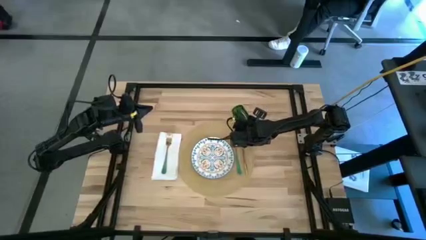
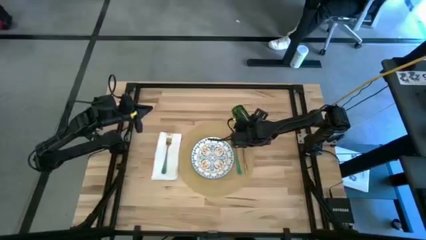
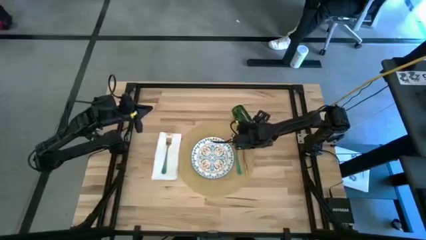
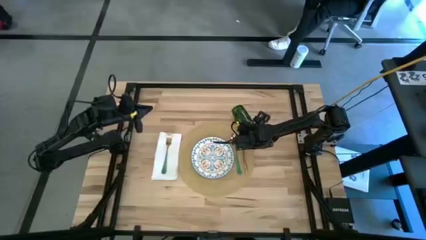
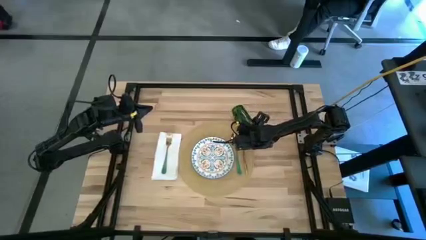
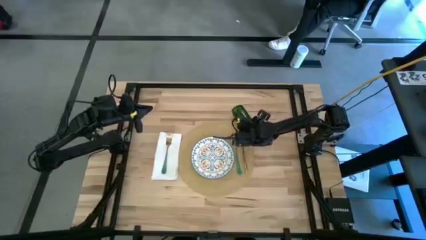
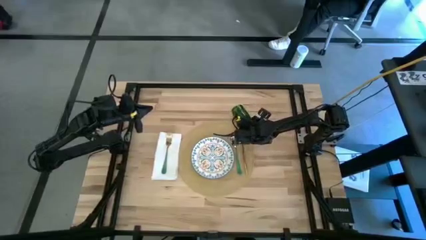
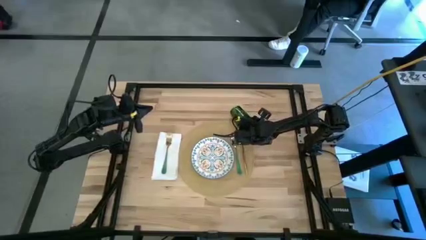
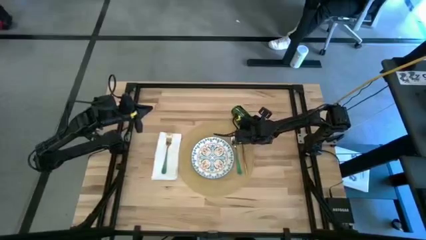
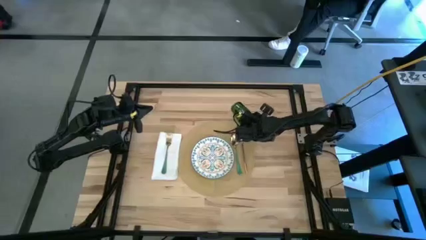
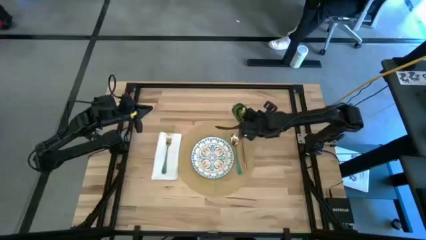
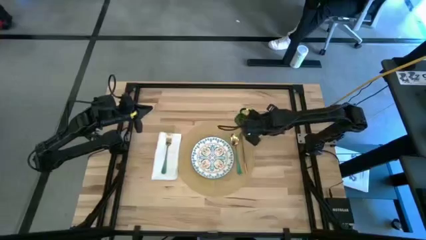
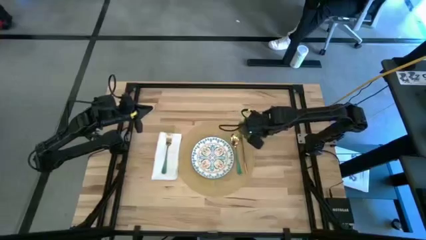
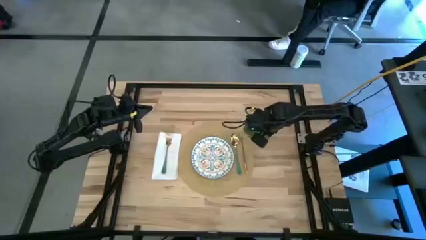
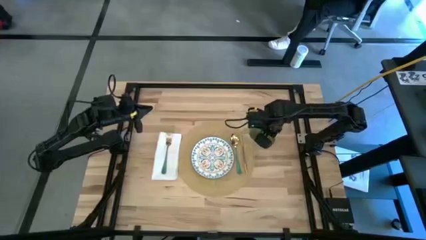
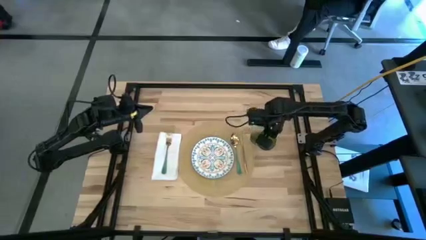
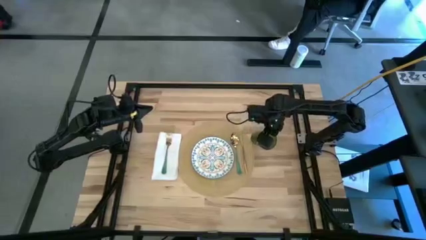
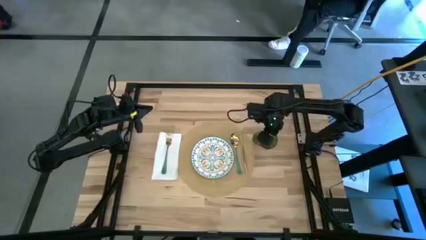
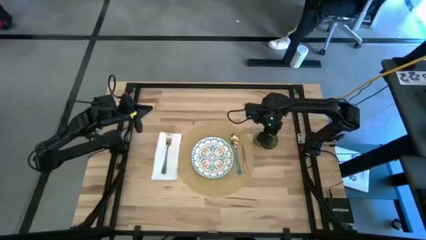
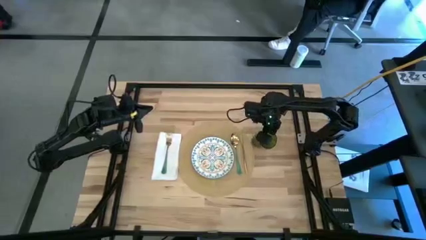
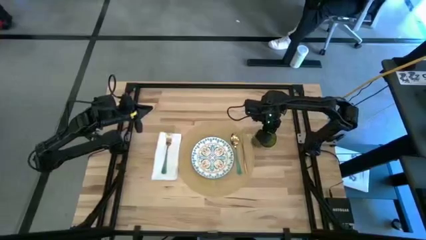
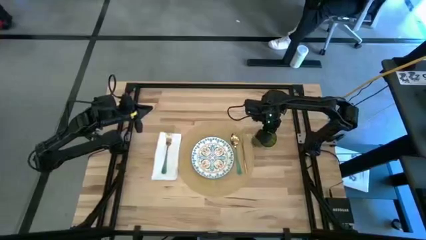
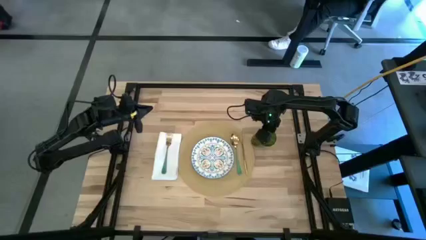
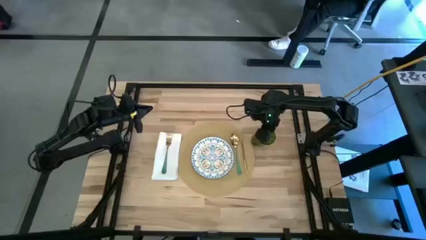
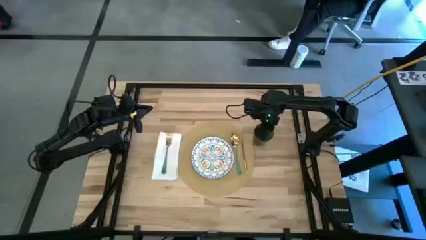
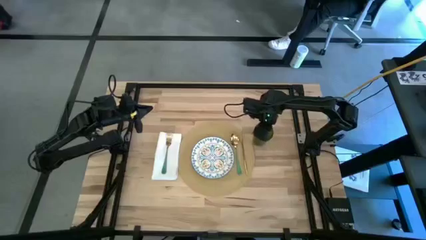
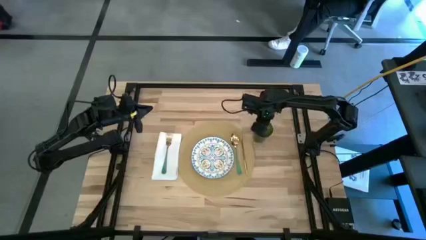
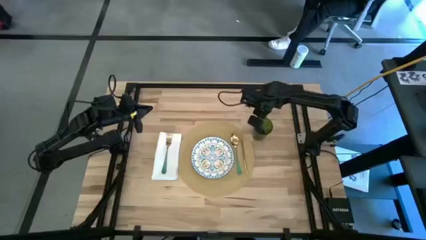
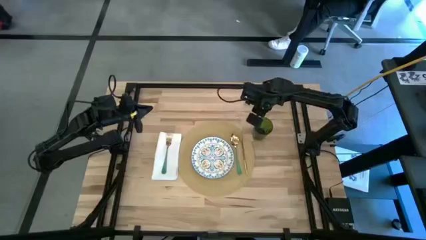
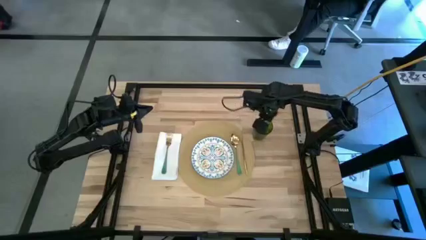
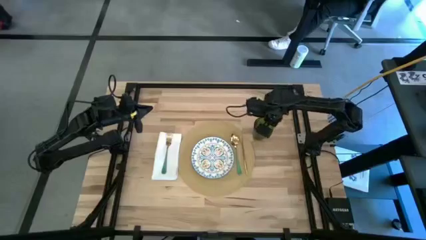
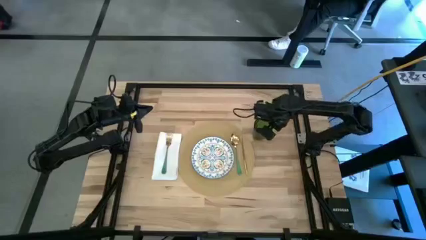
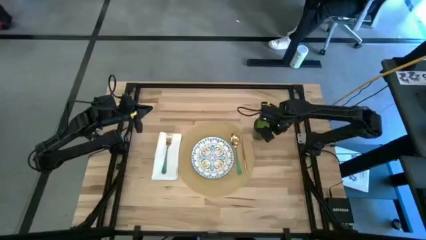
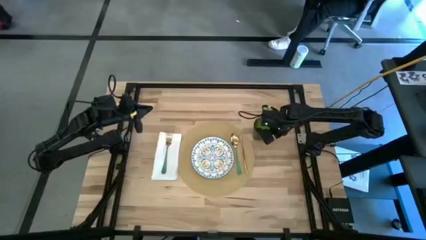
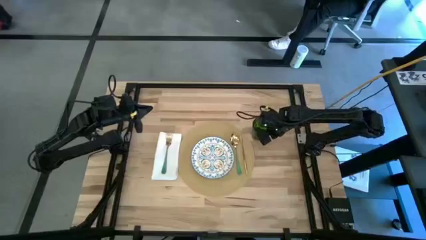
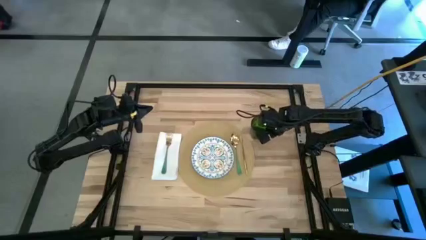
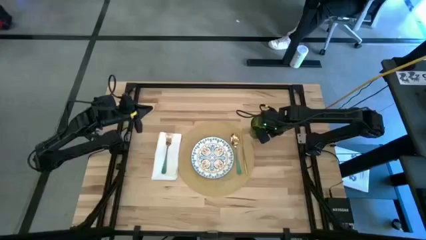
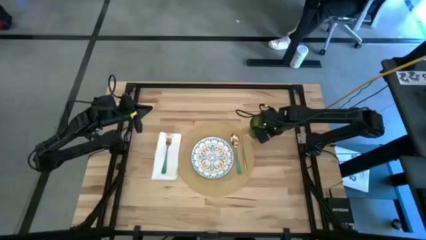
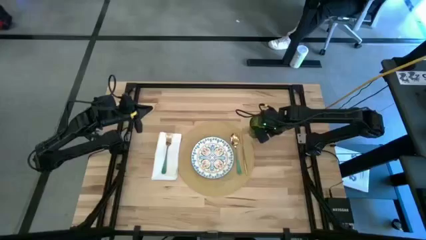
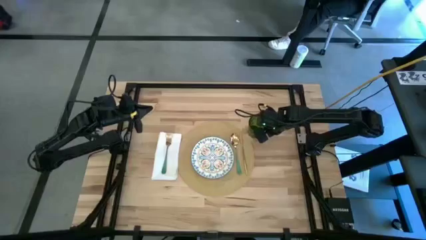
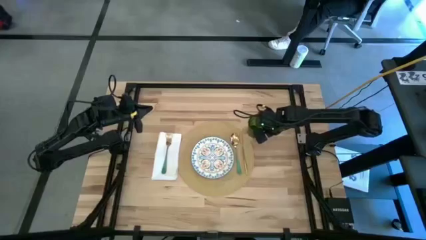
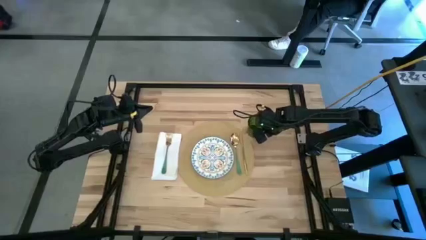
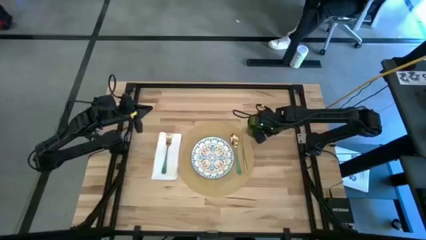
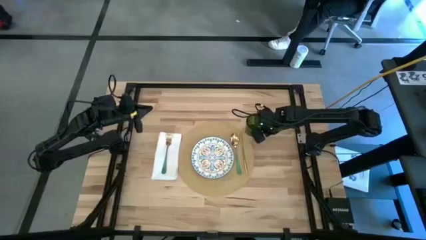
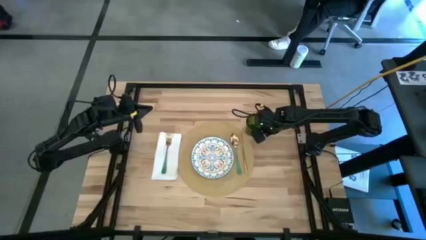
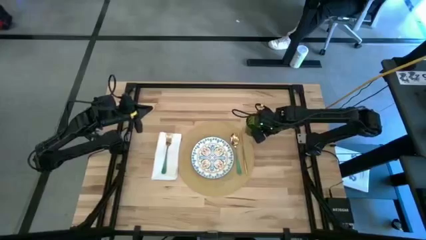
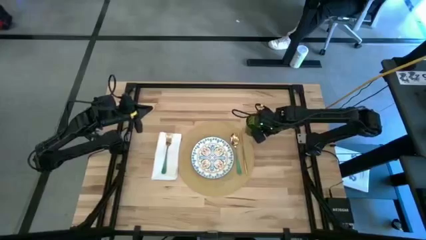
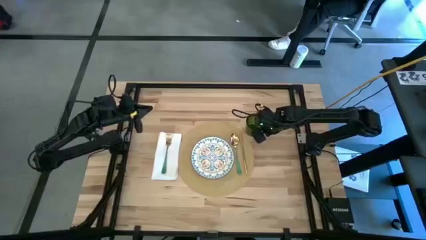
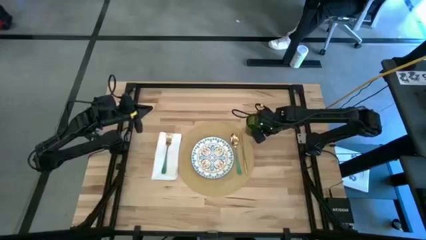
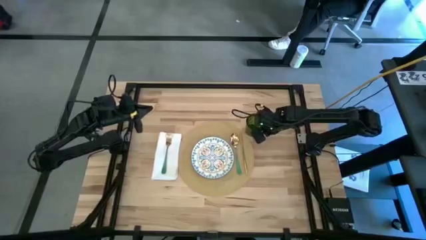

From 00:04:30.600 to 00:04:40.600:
Task: Set table place
Adjust the green cup

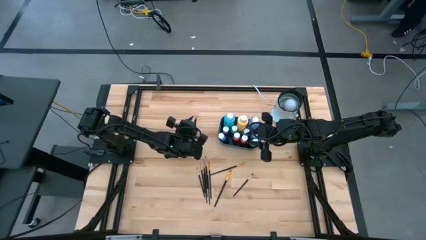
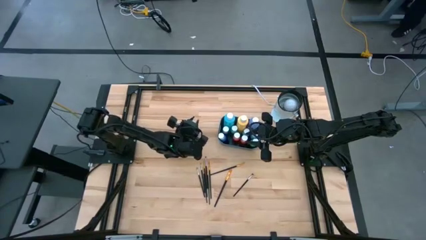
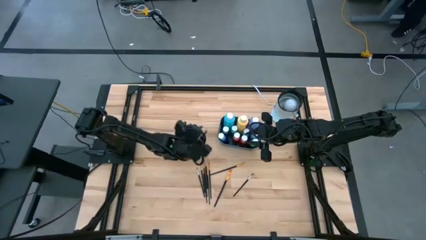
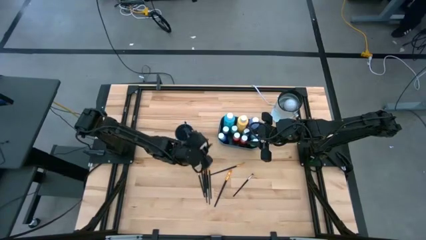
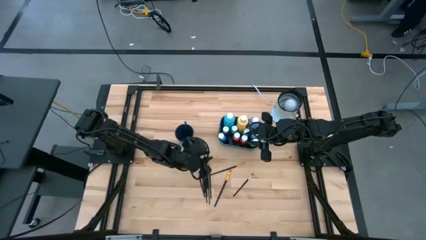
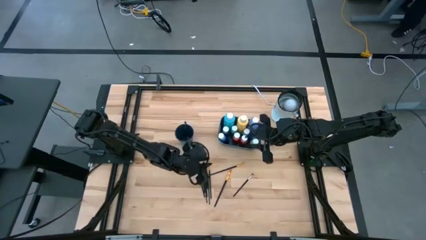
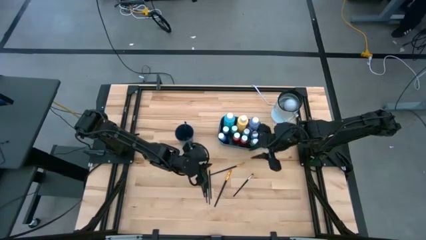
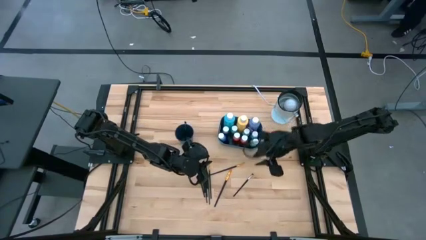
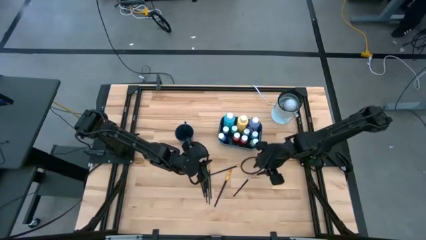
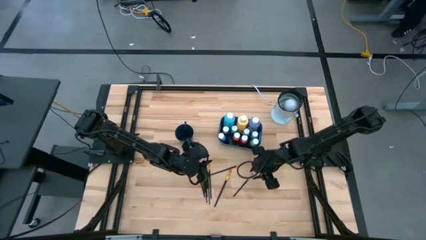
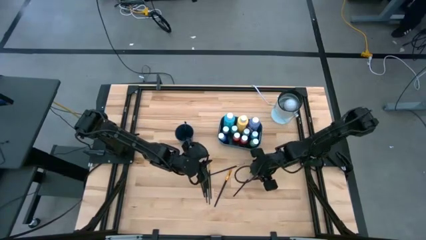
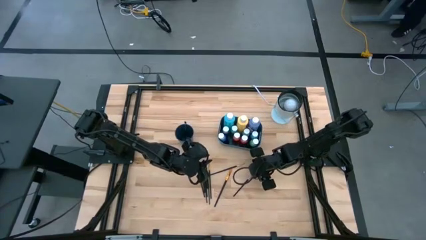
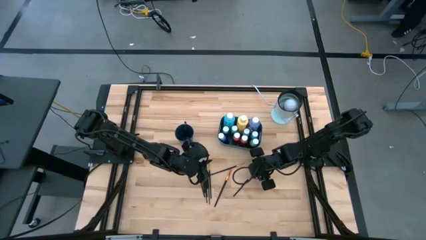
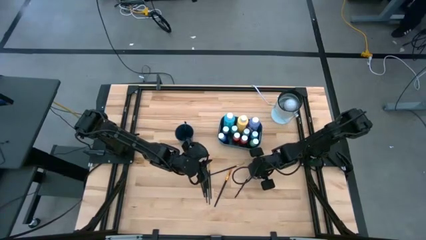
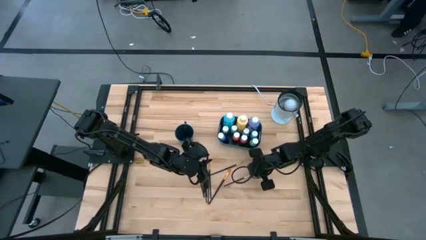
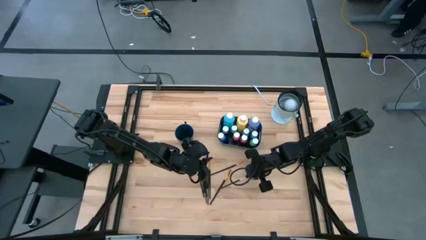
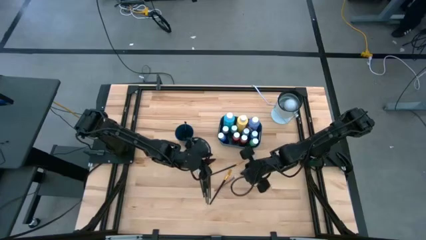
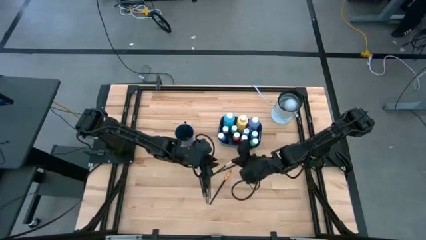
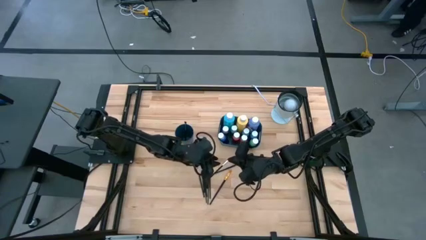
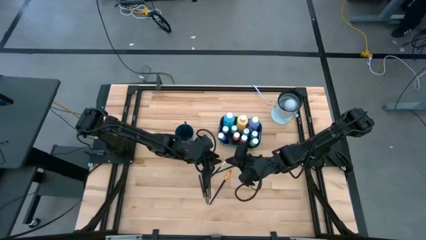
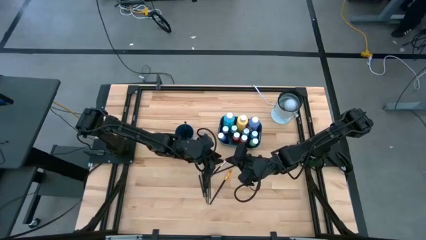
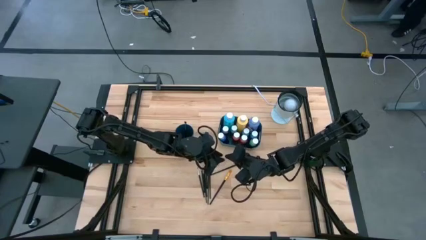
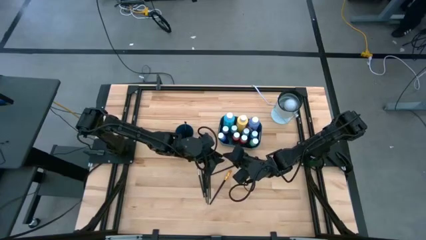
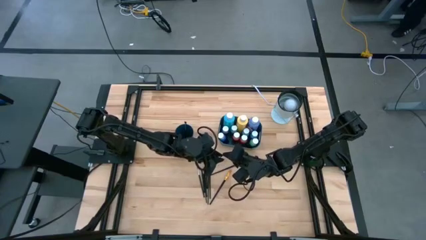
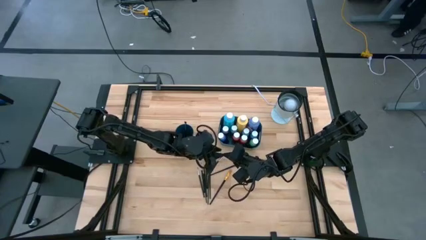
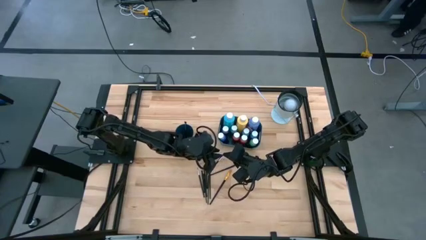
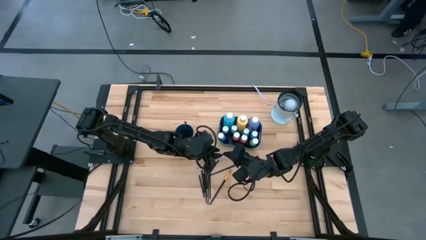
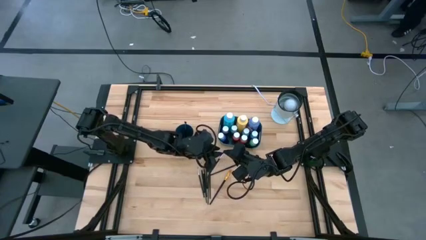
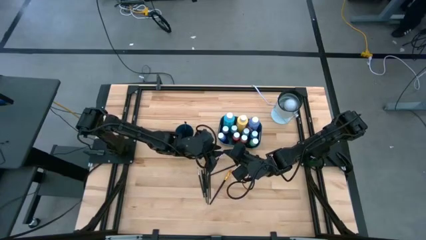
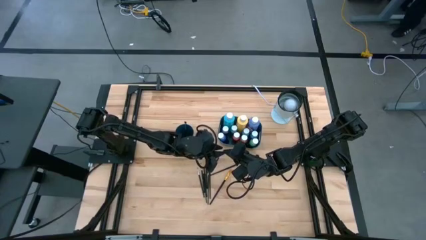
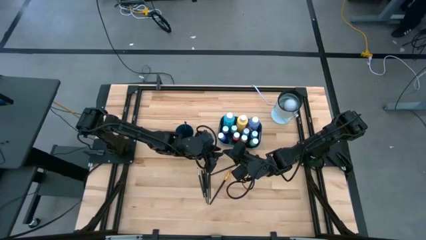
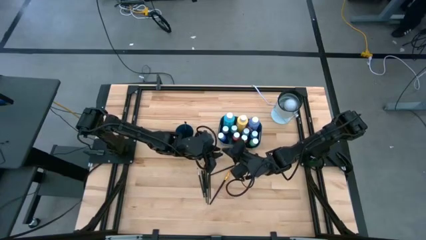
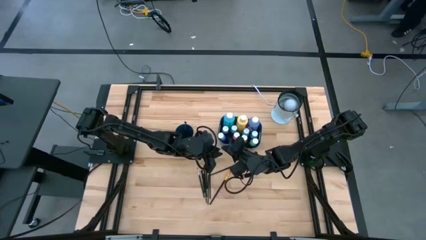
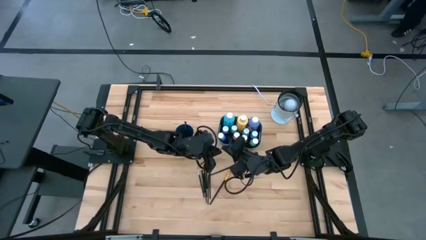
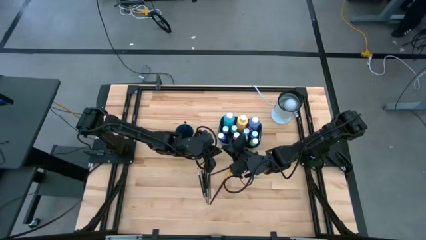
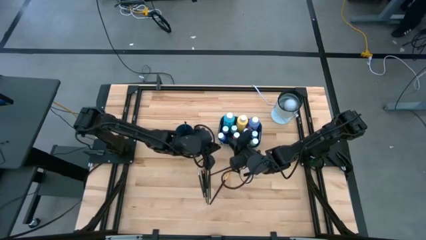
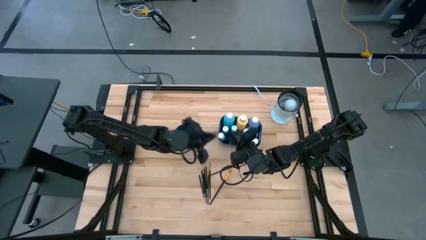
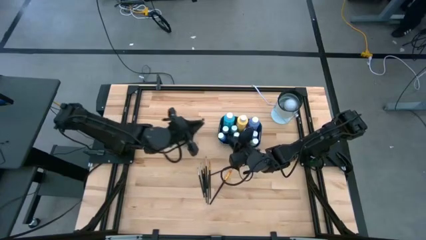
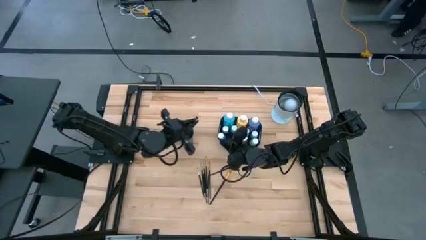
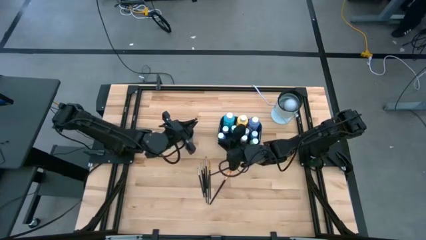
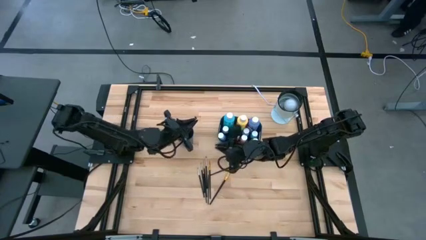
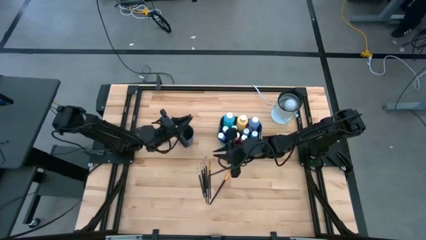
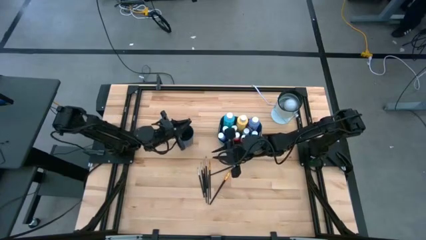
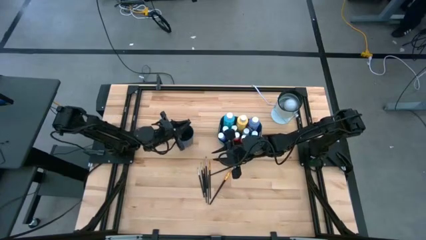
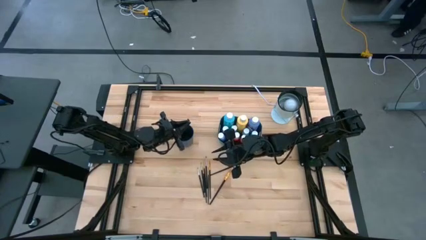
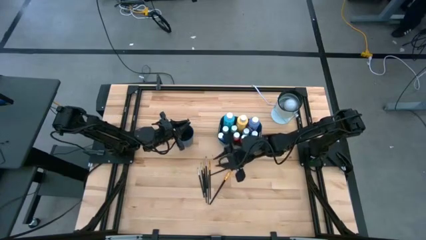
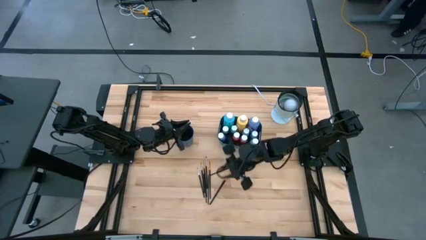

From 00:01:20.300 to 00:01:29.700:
Task: Pick & Place Paint Supplies
Put the silver paintbrush into the blue cup
